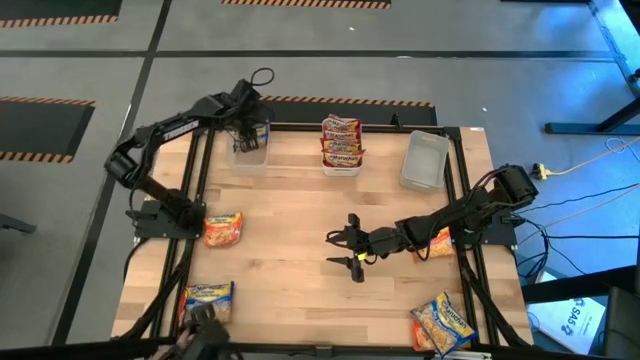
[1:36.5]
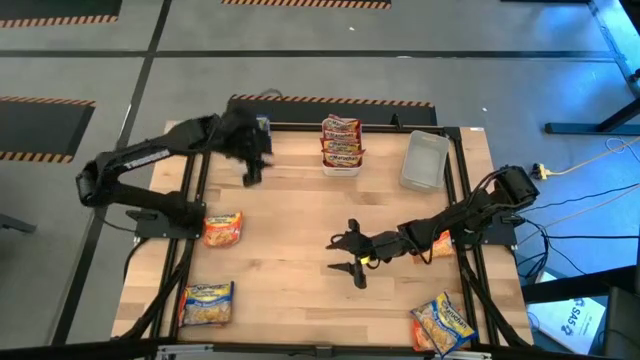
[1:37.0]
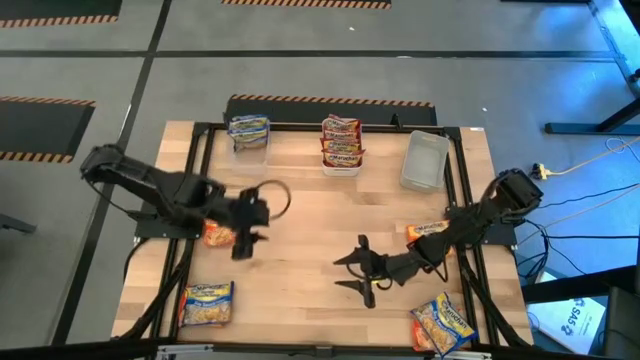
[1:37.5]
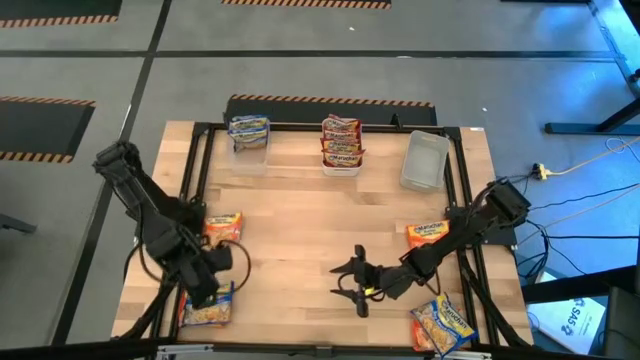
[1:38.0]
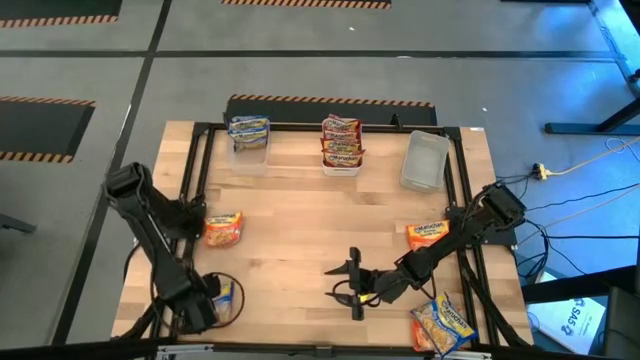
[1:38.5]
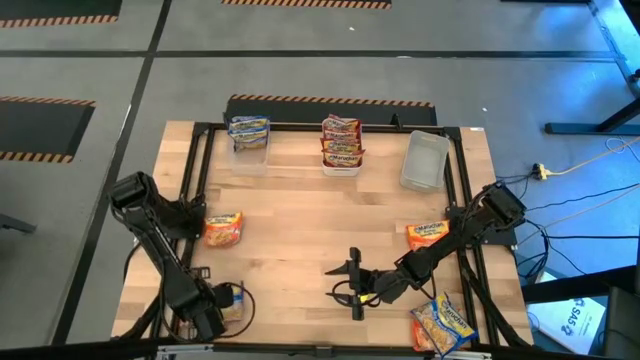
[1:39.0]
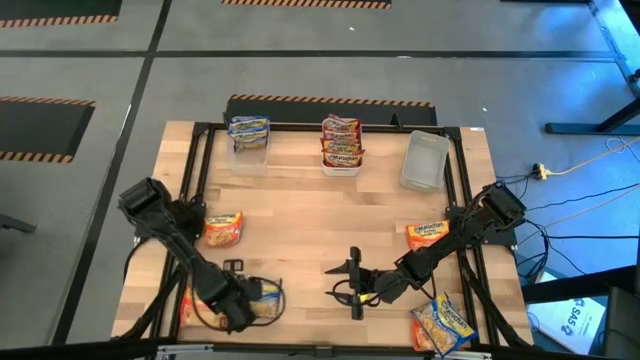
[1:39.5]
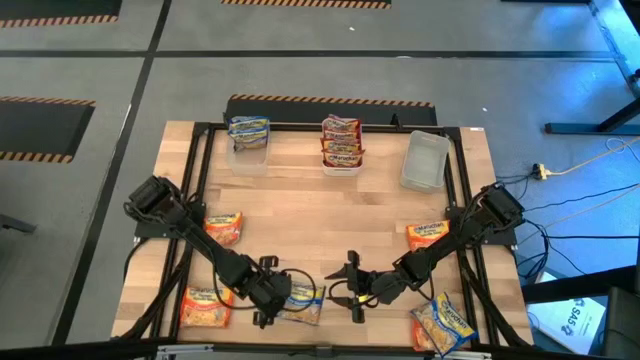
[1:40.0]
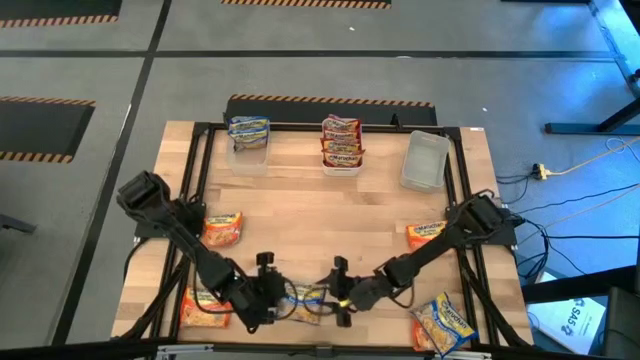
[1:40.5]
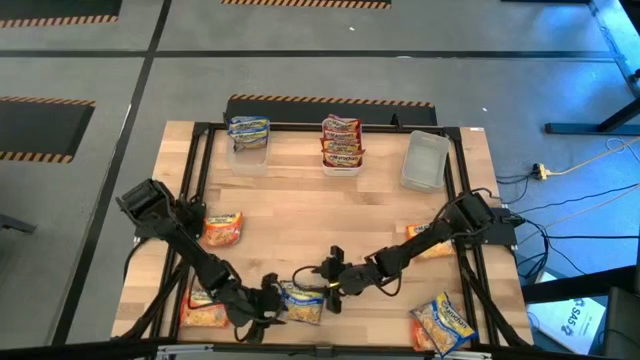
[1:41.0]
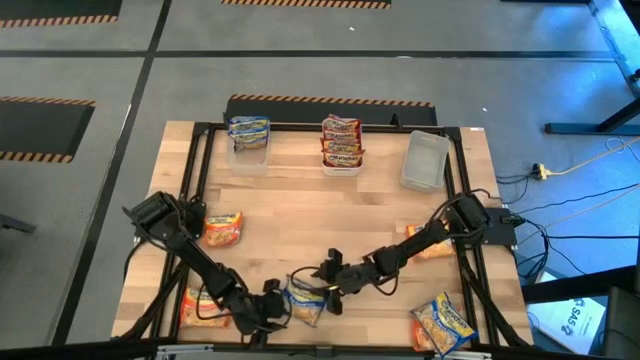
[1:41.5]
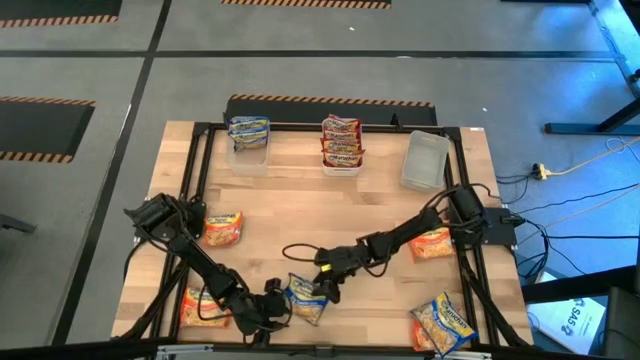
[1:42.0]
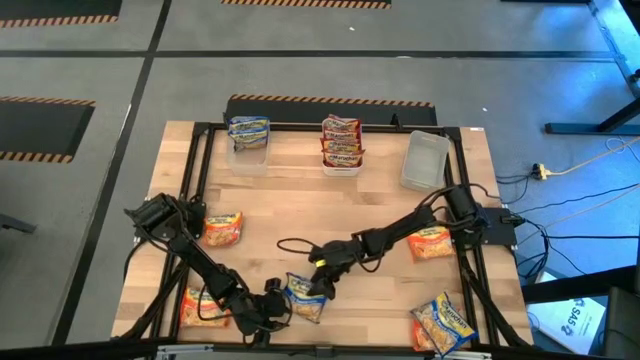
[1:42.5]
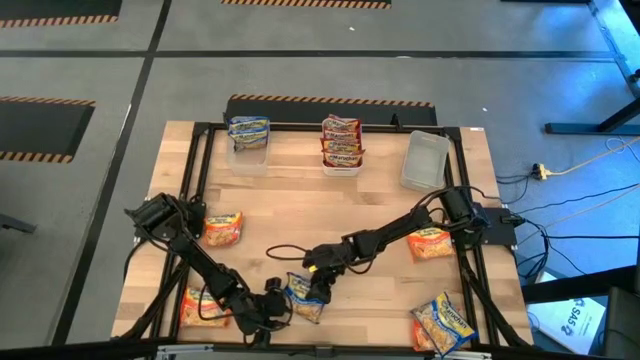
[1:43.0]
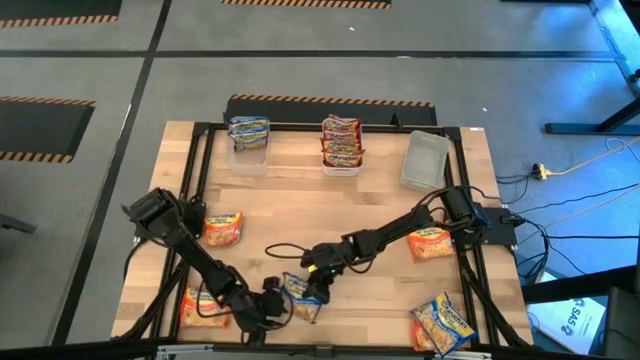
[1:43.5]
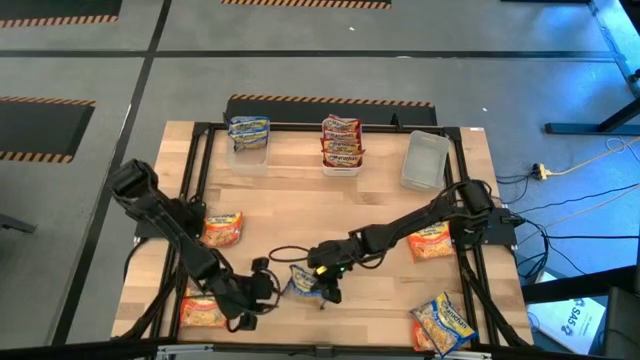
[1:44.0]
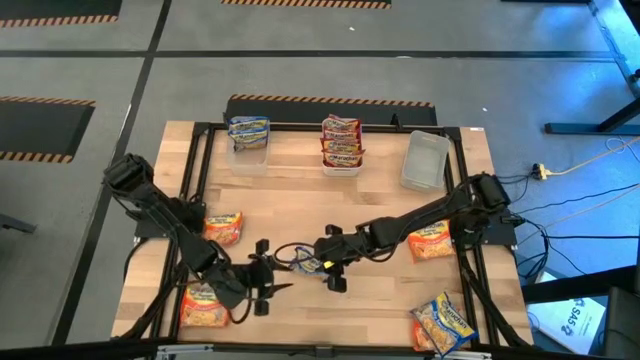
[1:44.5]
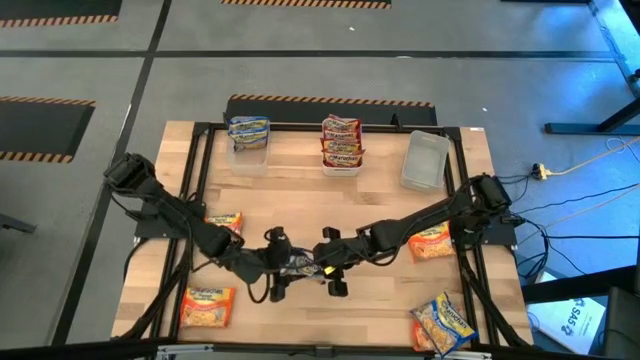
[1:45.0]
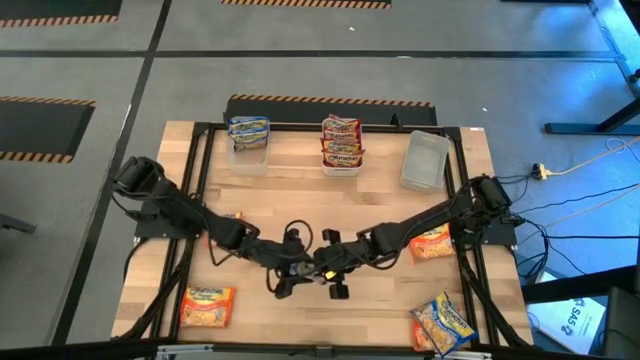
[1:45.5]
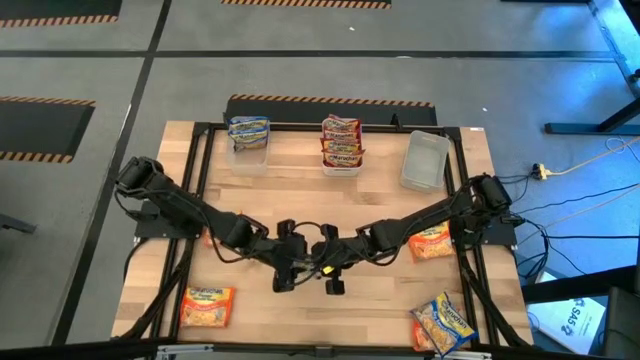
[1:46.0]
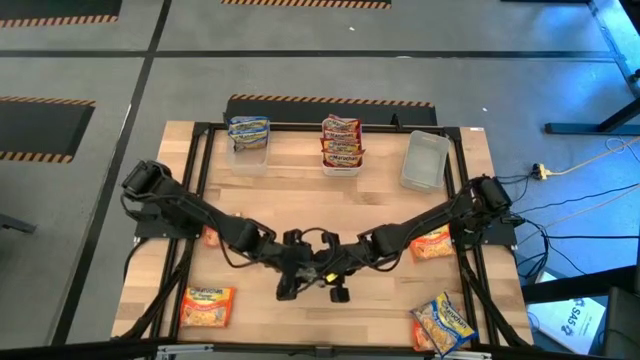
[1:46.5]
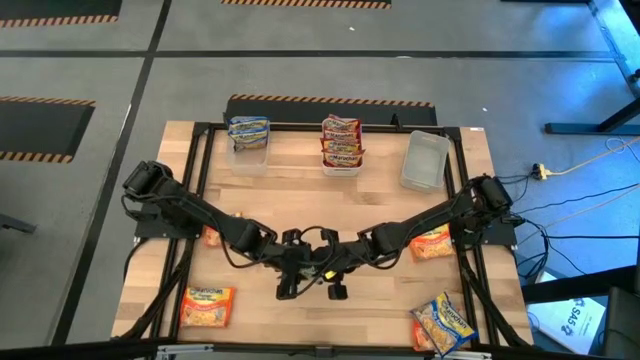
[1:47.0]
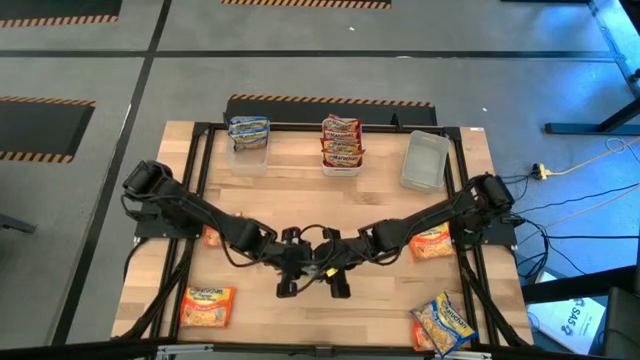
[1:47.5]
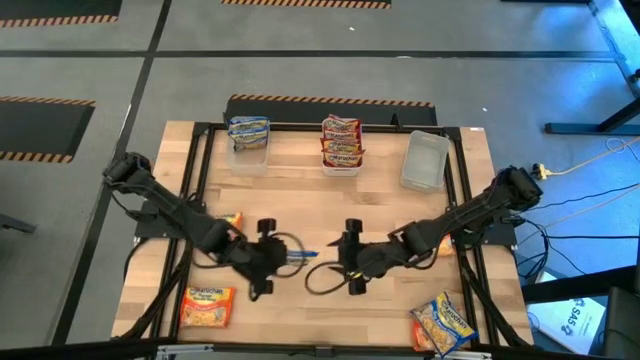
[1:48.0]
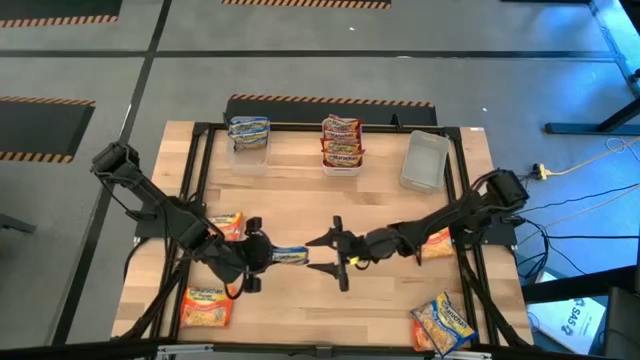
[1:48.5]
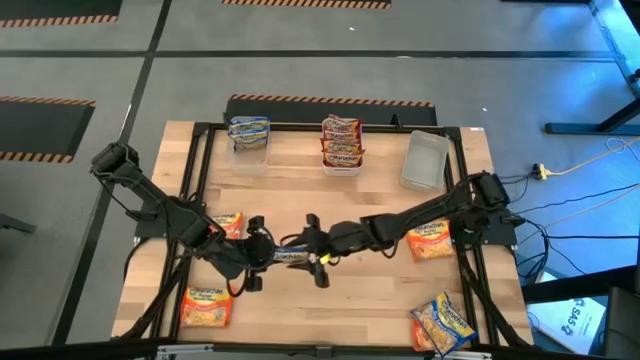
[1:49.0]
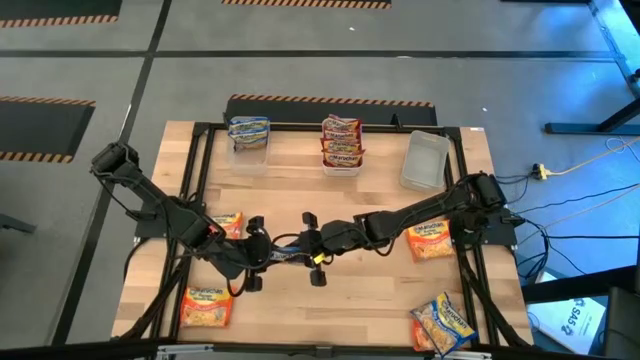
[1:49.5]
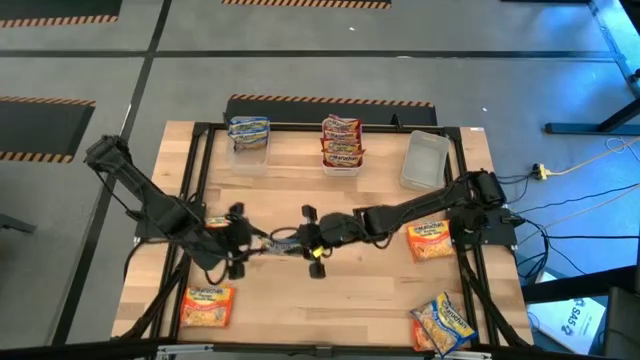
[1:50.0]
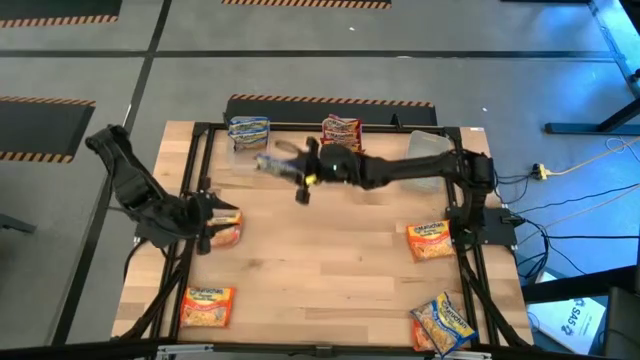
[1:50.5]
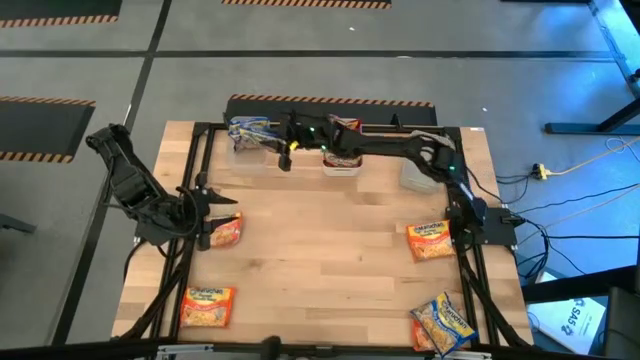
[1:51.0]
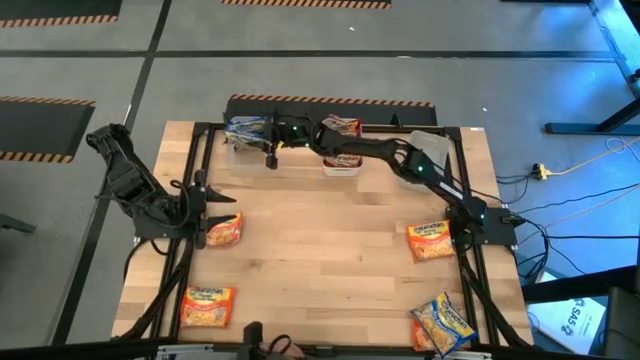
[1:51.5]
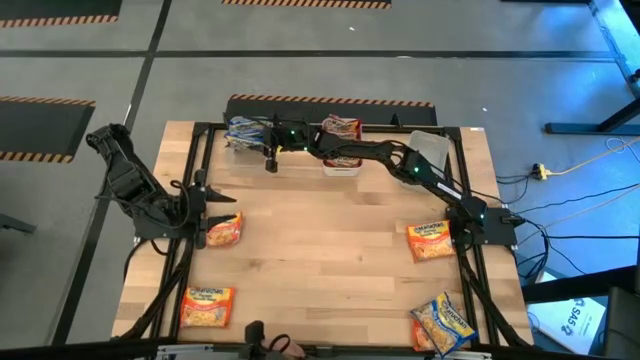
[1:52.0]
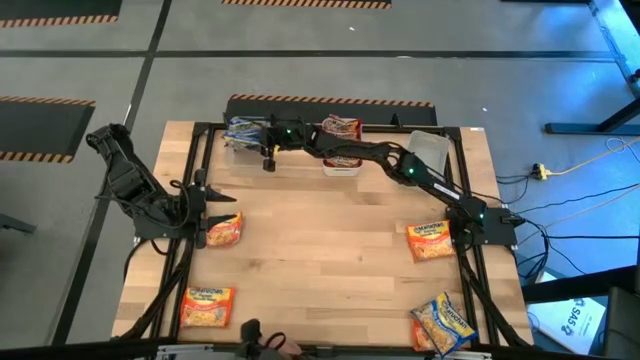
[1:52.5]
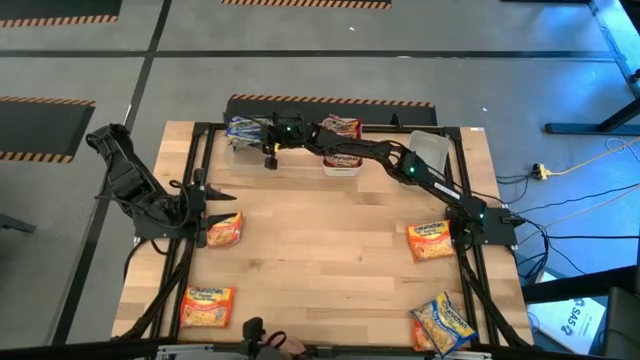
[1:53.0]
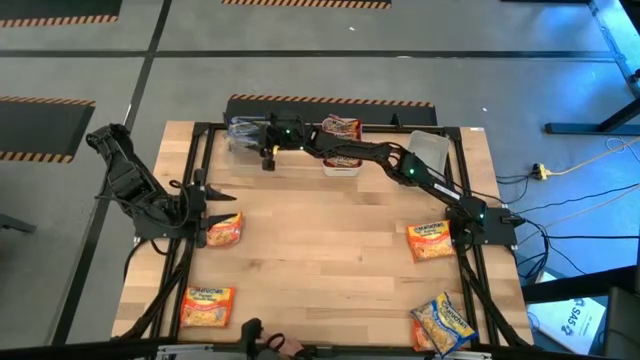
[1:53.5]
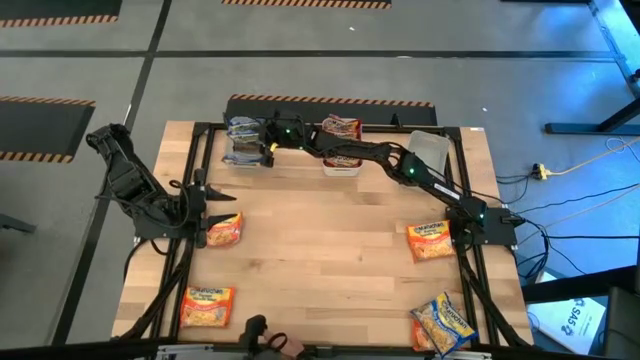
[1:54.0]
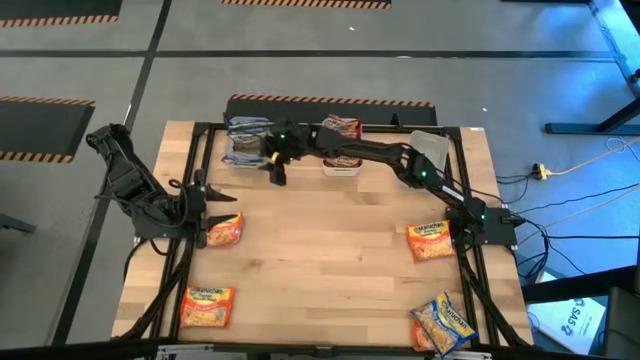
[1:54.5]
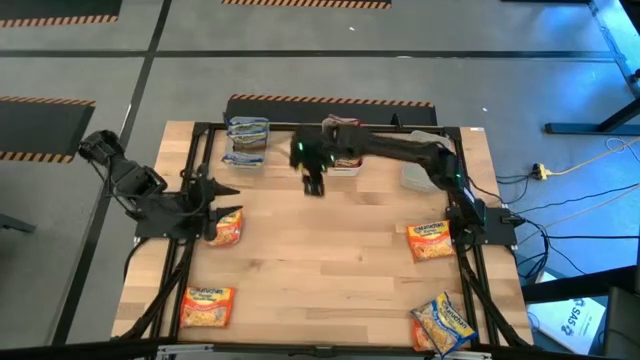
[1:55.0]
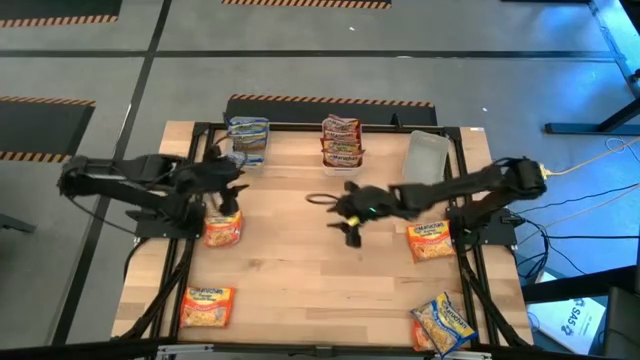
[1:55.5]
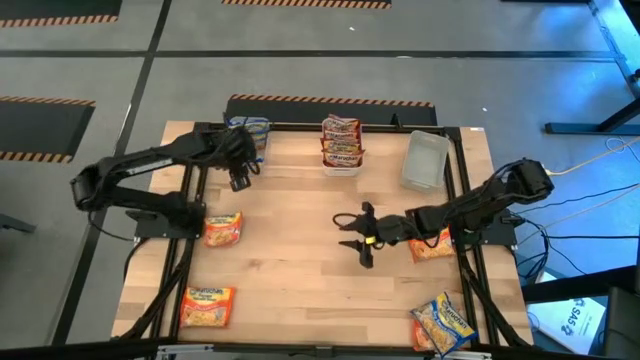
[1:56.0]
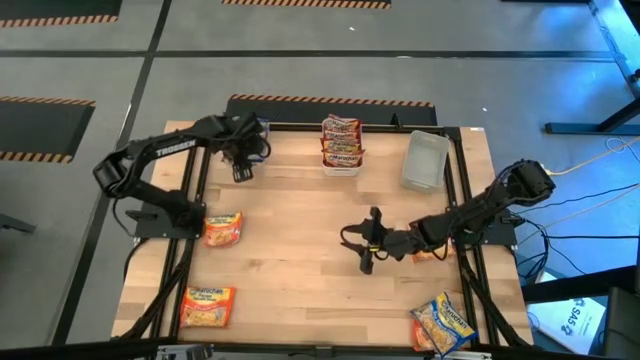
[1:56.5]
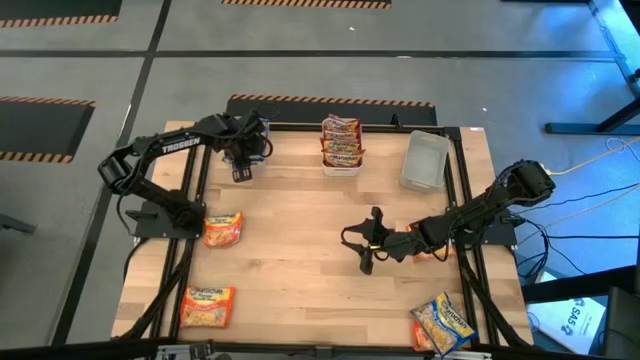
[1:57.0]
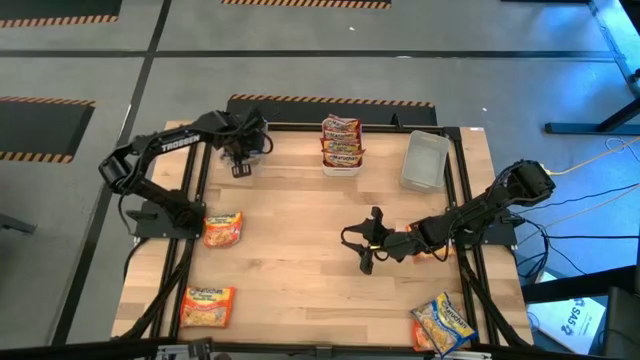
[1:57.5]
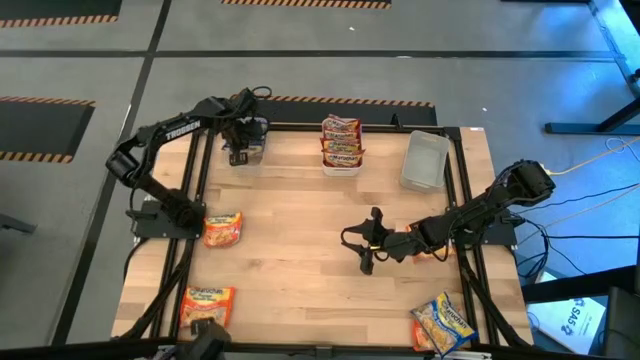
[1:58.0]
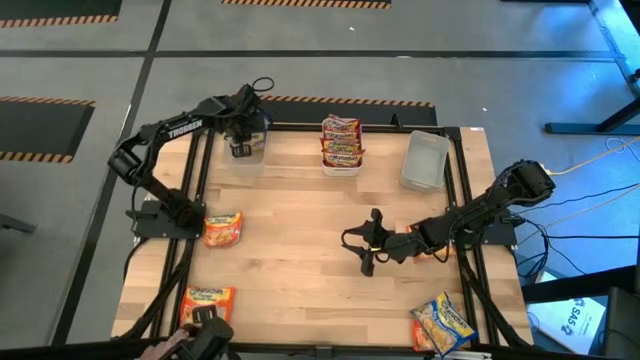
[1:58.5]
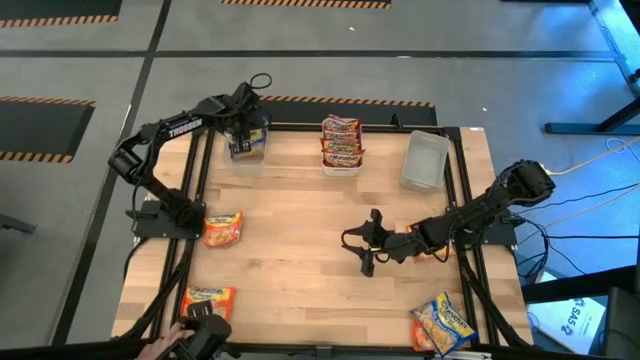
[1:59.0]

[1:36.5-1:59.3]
Task: Sort Maruchan noodles
Put the blue noodle pack into the transparent bin
